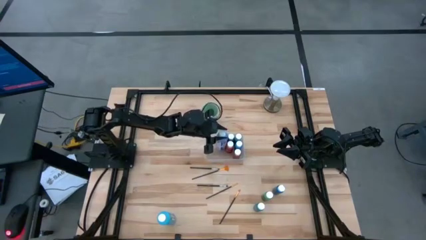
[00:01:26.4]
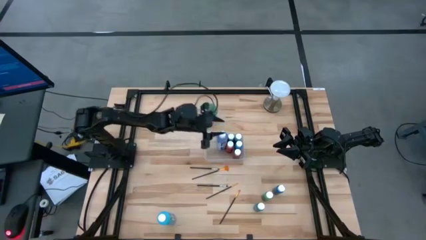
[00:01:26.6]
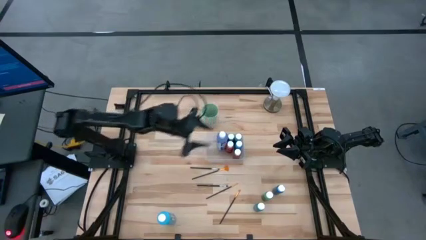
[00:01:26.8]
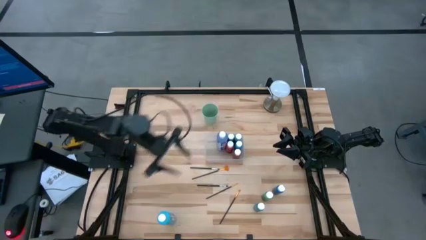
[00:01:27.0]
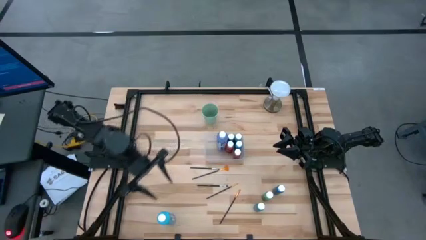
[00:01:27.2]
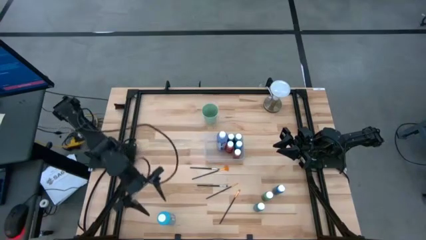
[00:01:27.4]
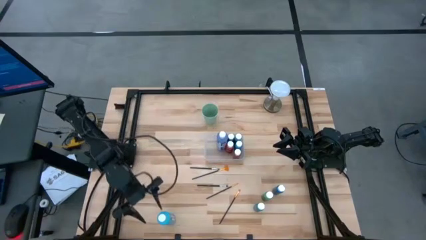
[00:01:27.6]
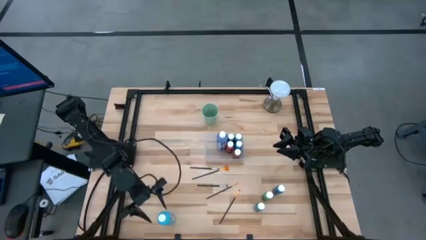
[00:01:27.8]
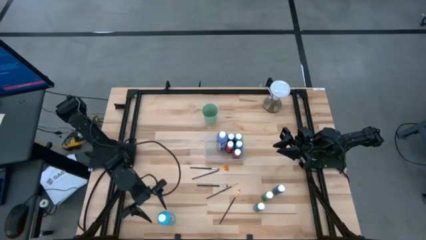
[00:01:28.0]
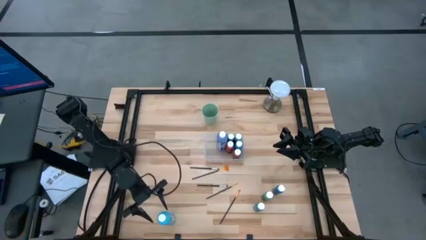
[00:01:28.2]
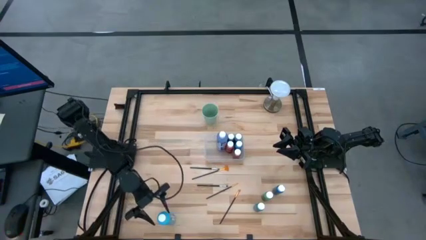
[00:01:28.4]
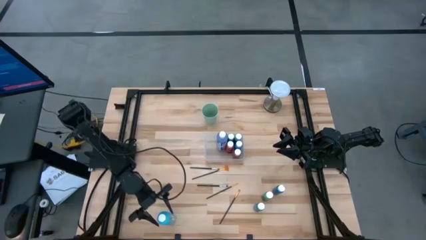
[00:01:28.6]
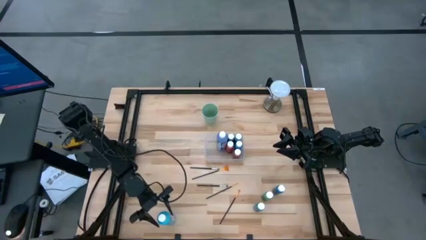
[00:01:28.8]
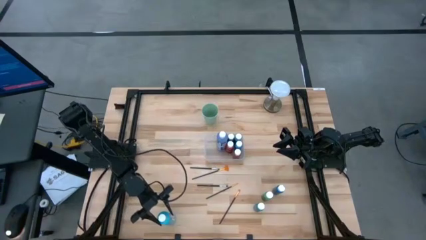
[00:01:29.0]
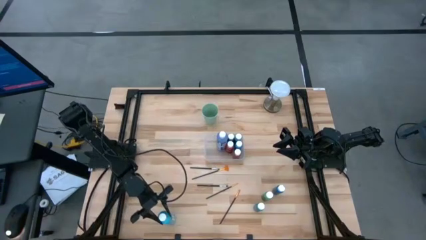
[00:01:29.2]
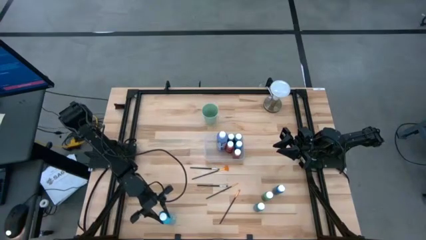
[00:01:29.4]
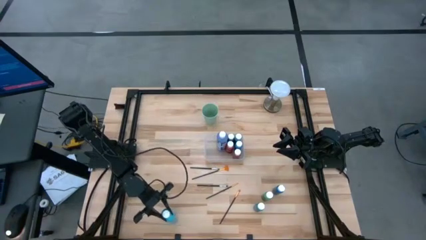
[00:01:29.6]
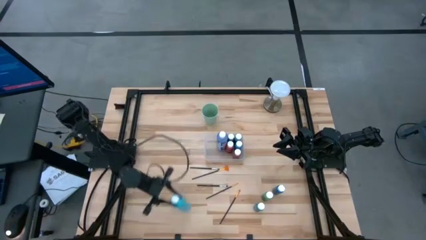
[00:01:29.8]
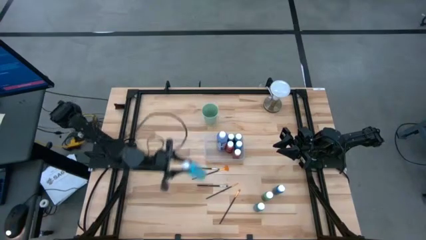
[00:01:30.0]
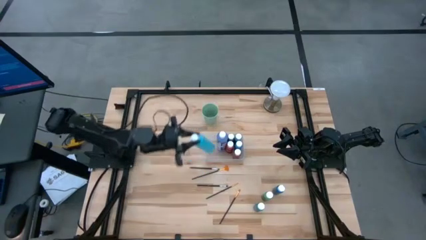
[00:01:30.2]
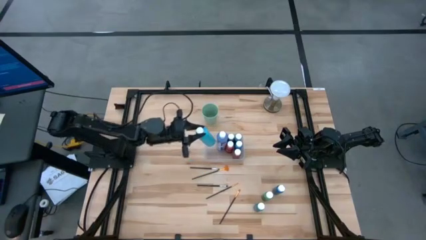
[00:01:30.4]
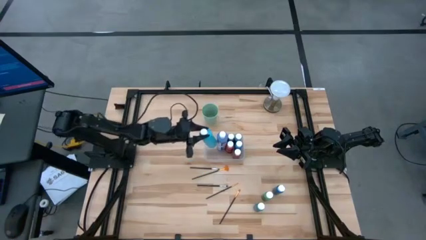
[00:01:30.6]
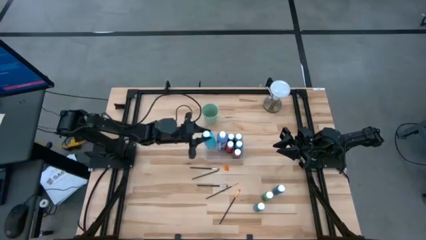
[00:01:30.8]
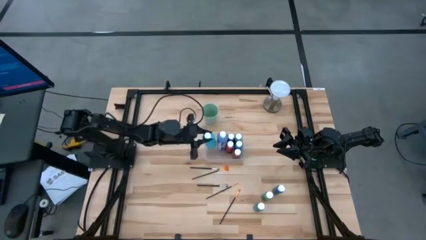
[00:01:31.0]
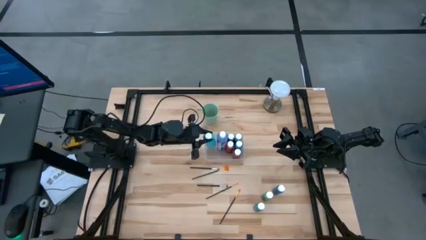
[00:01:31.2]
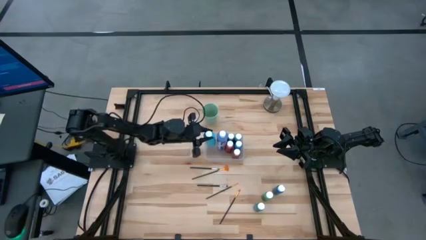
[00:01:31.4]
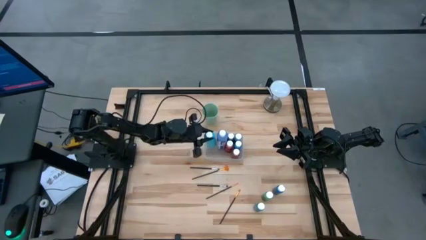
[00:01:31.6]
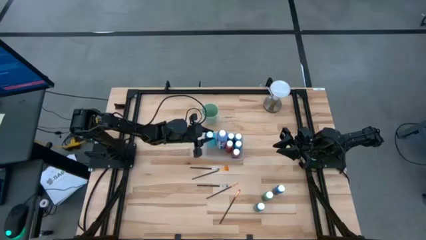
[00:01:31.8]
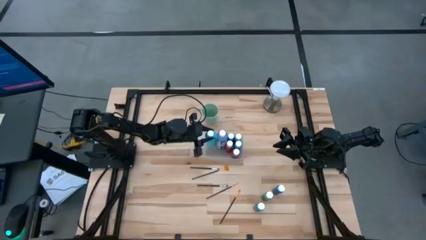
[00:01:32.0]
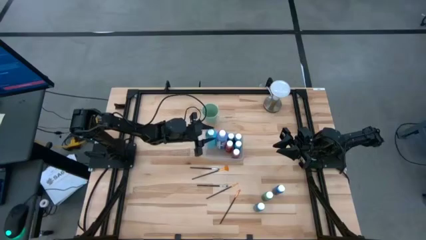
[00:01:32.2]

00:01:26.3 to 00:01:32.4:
Task: Pick & Place Paint Supplies
Put the large light blue paint bottle into the transparent bin

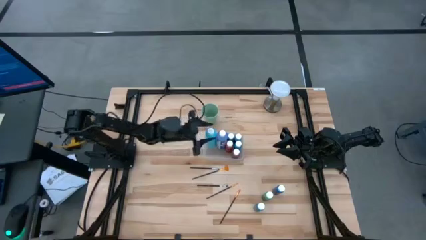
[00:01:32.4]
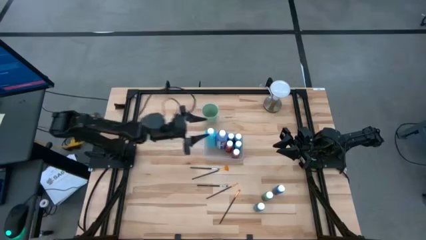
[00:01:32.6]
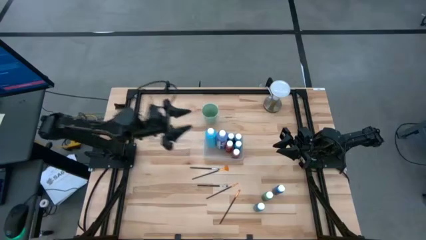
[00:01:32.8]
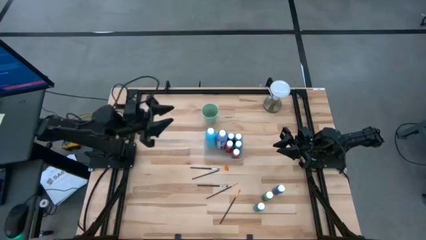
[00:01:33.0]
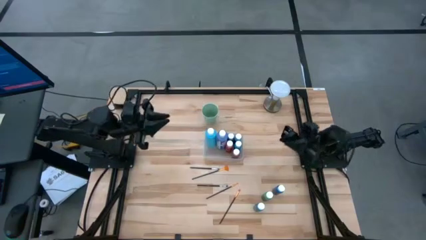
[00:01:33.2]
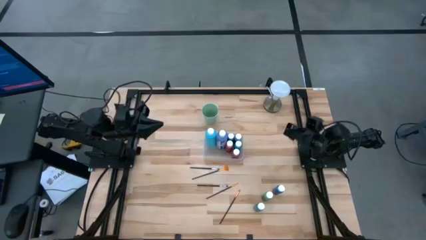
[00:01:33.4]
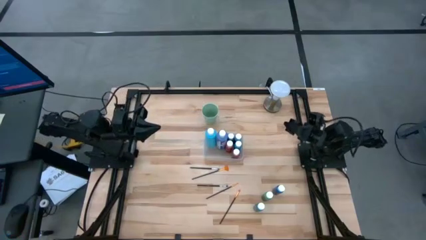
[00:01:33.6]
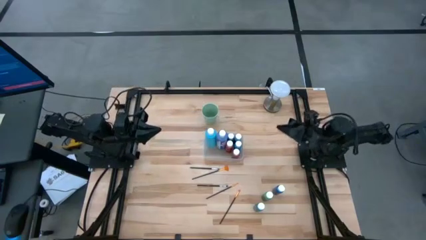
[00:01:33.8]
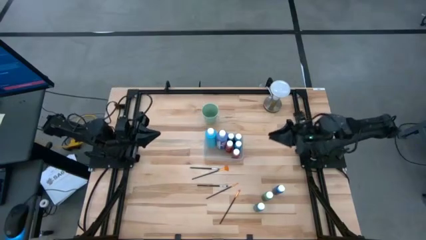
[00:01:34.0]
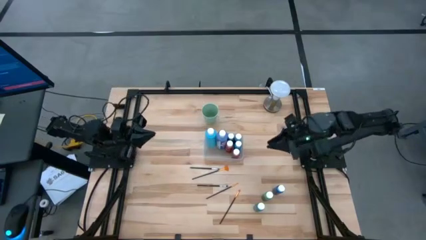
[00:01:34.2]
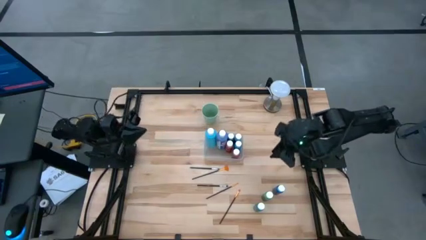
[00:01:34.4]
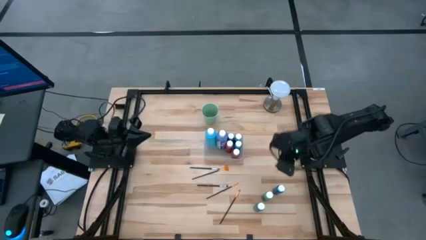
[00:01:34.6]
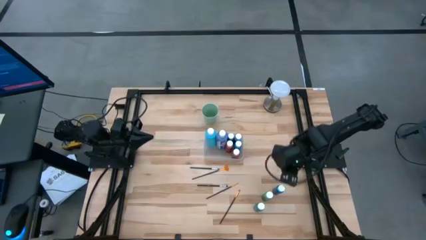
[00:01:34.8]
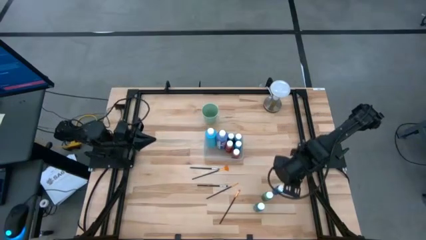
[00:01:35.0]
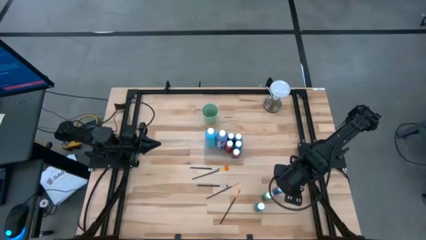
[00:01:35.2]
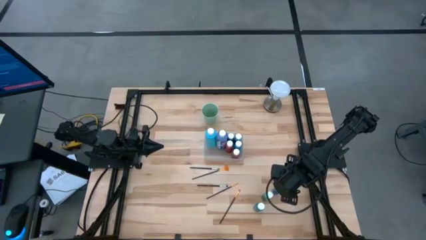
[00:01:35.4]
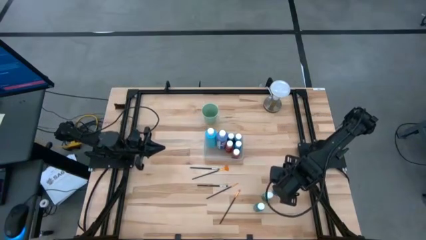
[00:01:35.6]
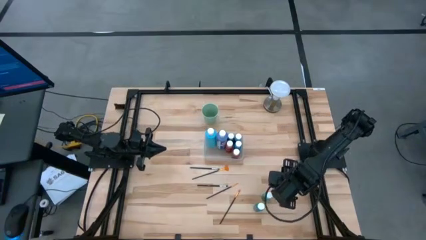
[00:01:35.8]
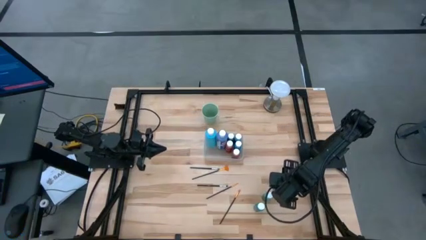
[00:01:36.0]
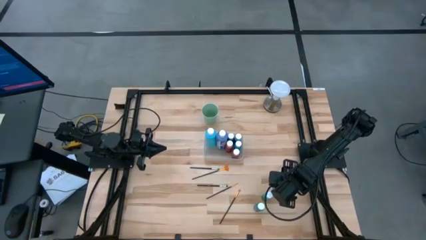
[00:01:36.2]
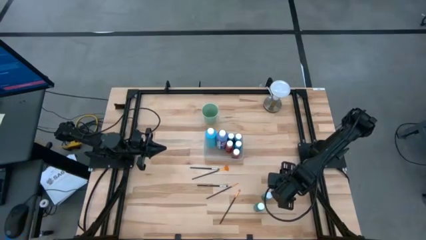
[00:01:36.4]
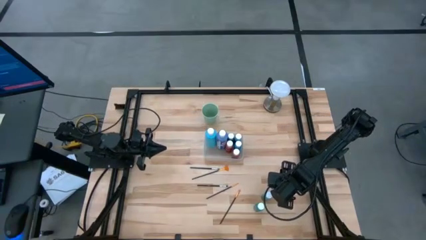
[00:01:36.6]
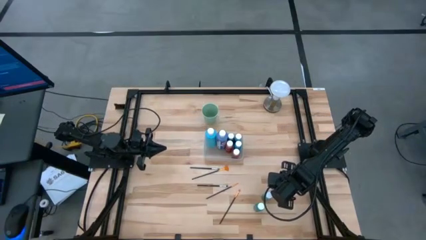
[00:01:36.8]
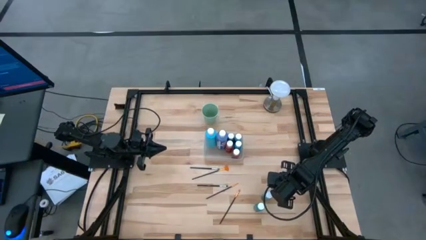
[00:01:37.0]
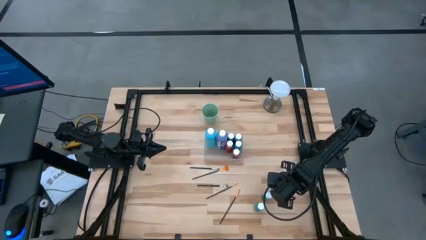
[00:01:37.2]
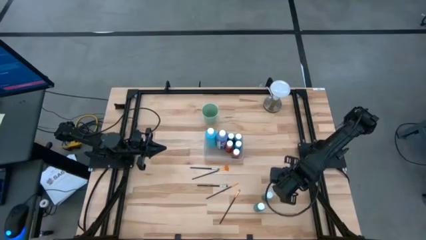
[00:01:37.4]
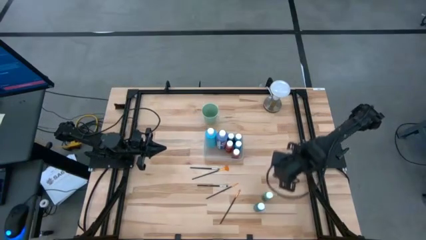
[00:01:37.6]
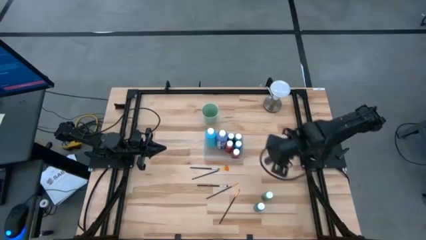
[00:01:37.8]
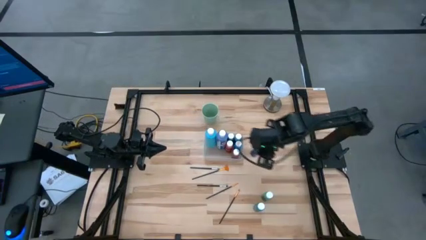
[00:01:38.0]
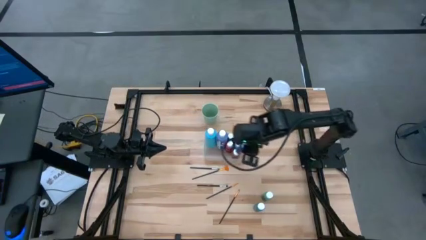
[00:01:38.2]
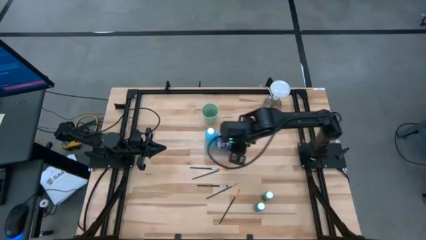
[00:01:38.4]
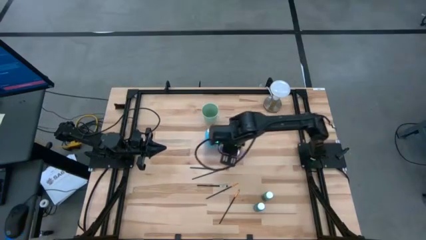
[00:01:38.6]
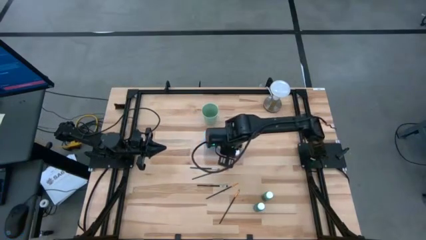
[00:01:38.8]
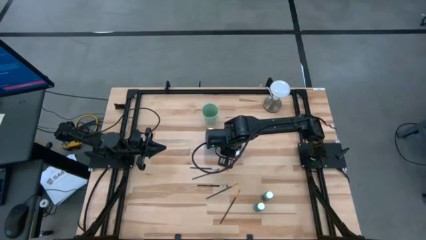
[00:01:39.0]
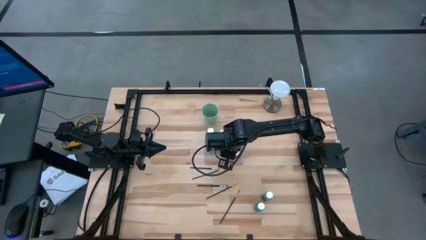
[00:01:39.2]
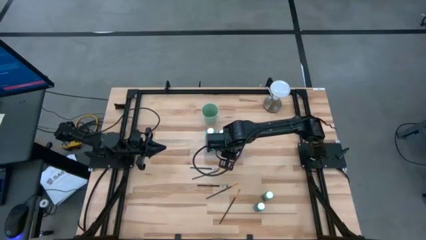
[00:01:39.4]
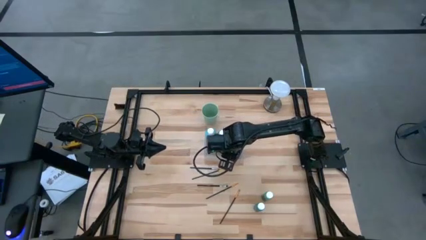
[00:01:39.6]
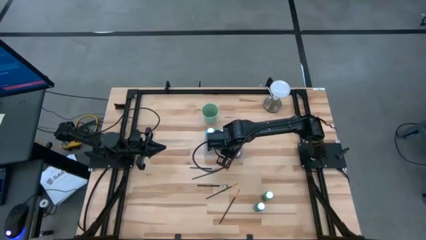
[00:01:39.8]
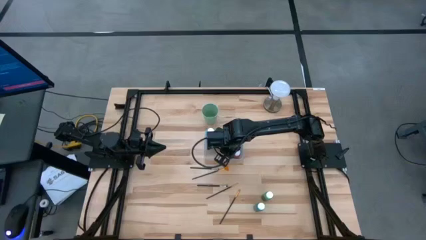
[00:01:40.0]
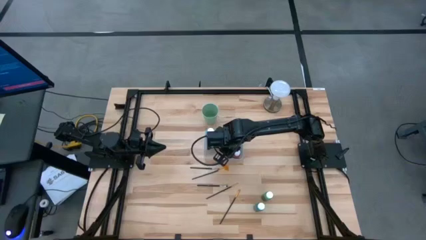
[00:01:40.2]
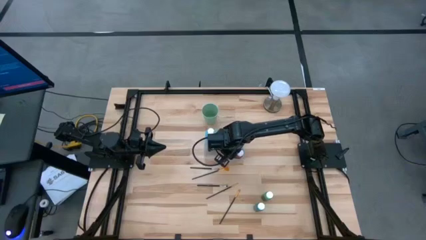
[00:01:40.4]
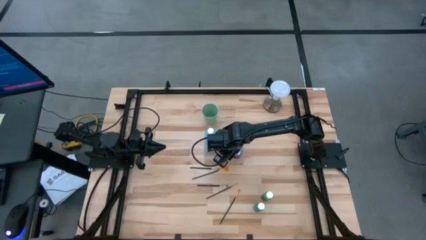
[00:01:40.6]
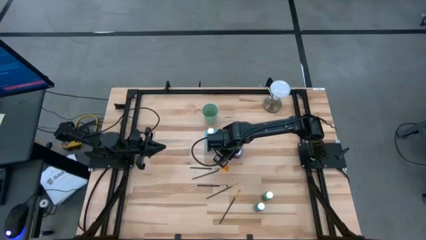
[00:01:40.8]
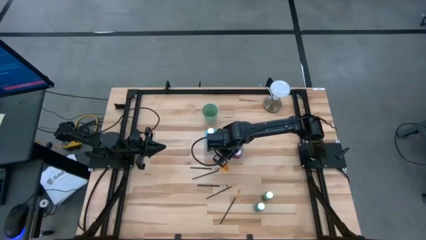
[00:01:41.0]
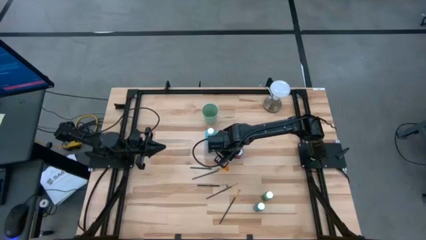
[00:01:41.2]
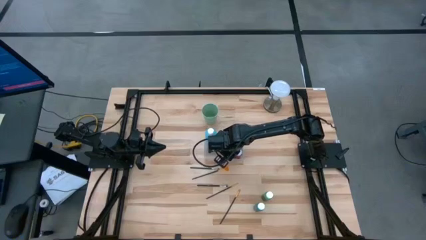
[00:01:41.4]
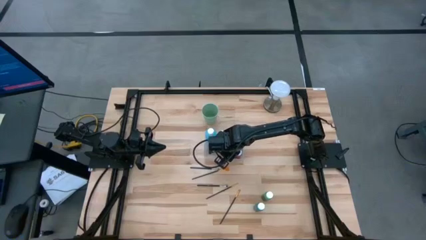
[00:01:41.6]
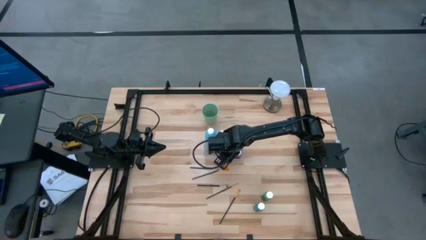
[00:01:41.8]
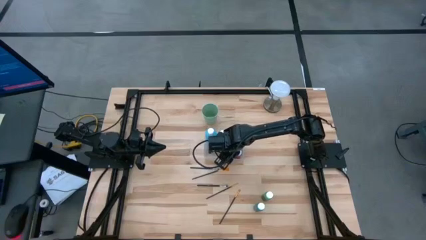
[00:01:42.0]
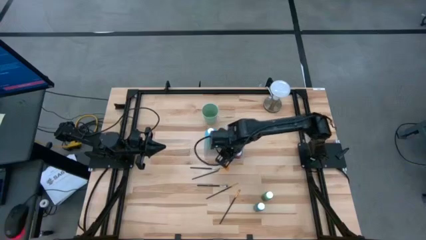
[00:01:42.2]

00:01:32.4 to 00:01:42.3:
Put the blue paint bottle into the transparent bin
